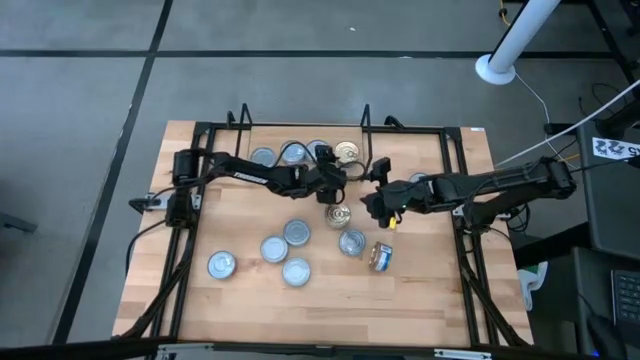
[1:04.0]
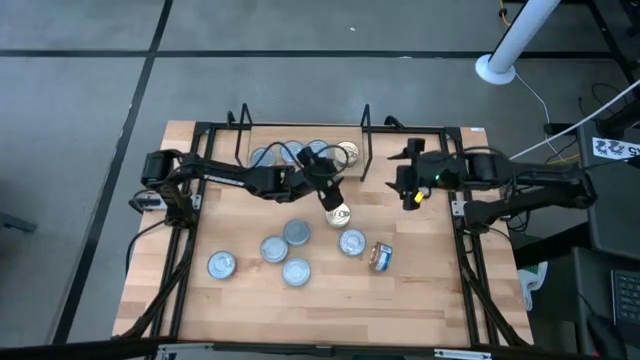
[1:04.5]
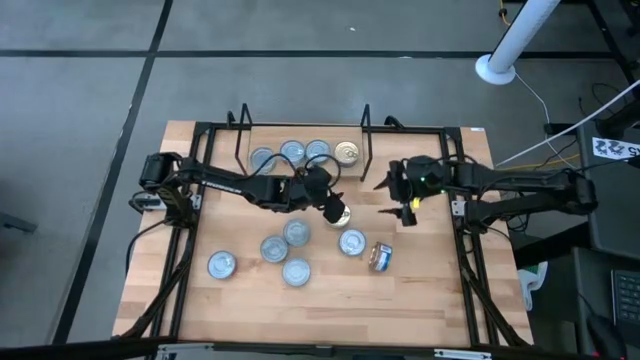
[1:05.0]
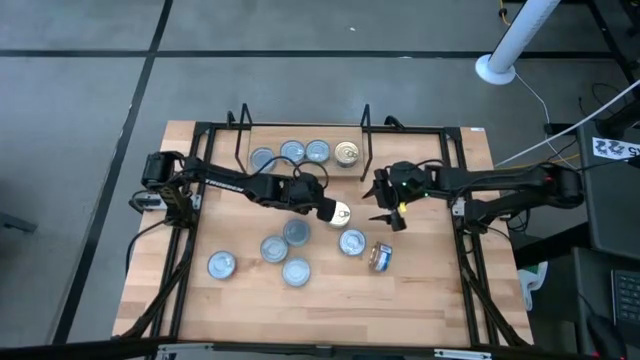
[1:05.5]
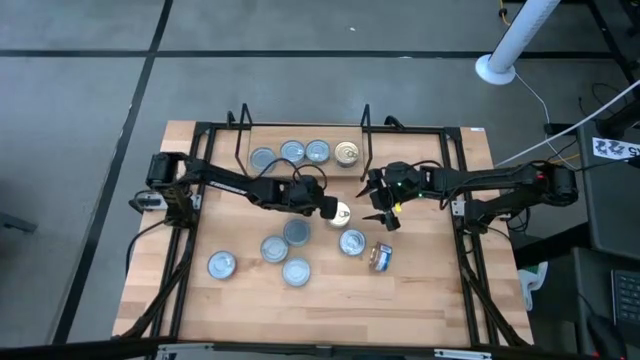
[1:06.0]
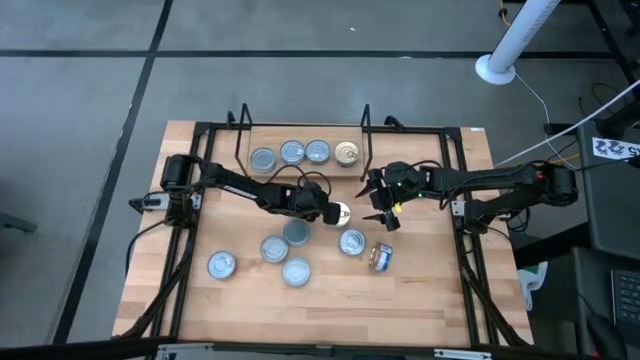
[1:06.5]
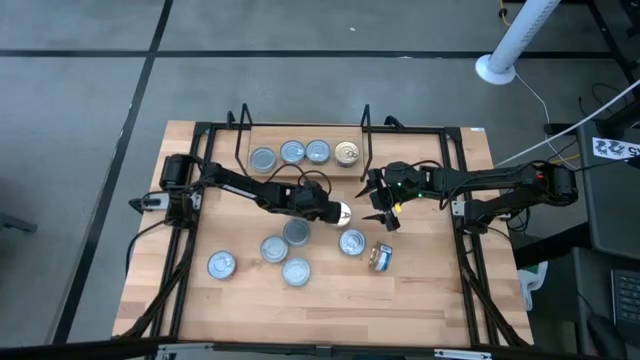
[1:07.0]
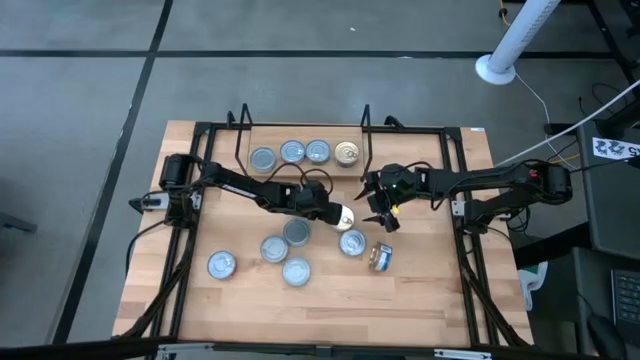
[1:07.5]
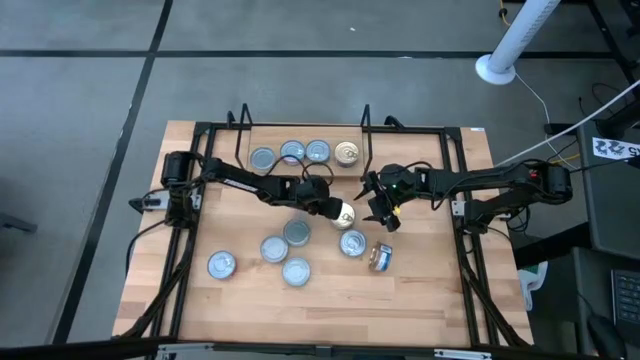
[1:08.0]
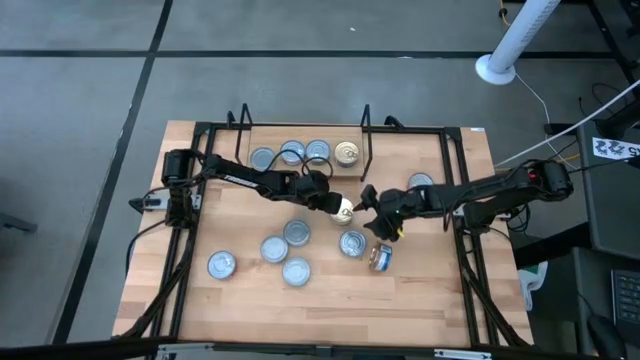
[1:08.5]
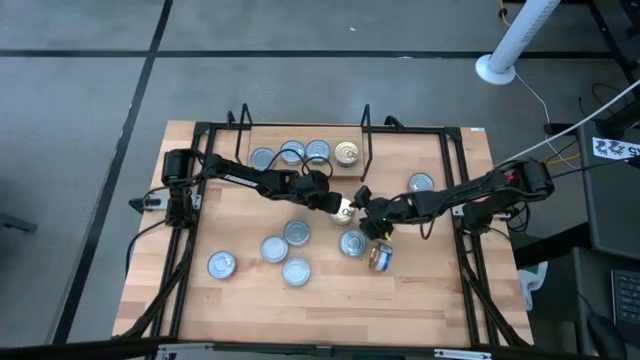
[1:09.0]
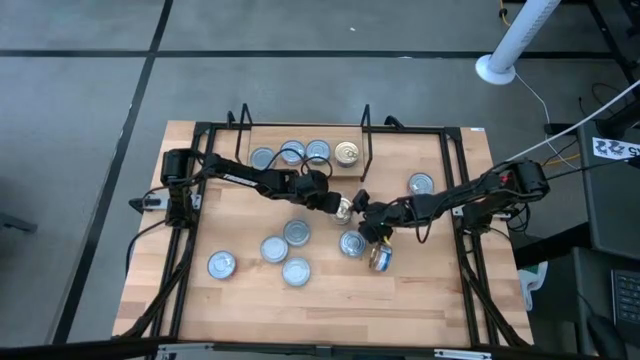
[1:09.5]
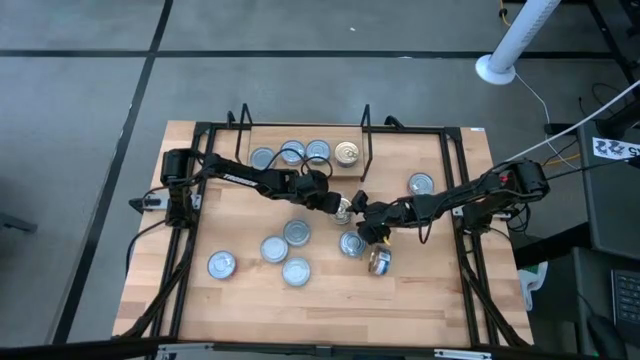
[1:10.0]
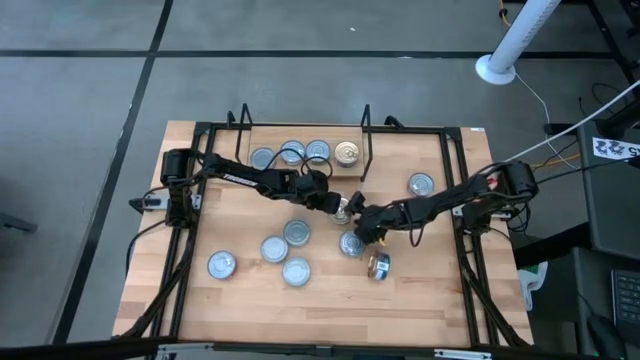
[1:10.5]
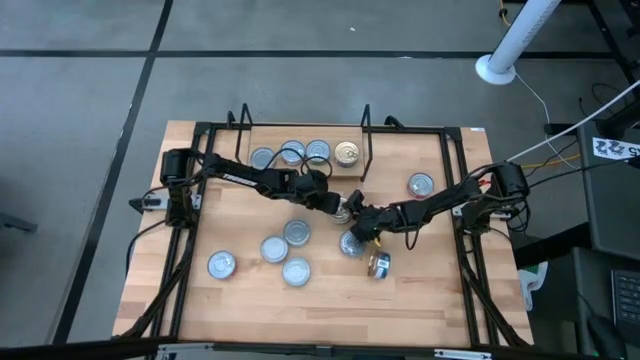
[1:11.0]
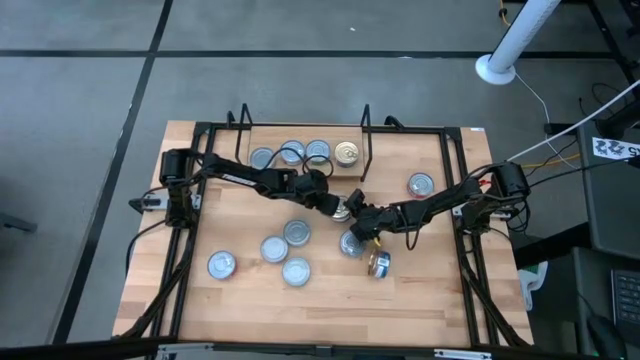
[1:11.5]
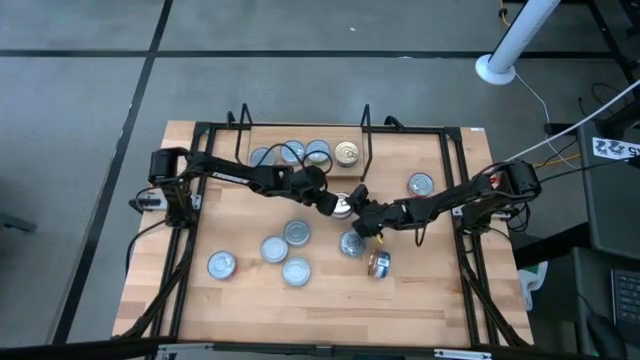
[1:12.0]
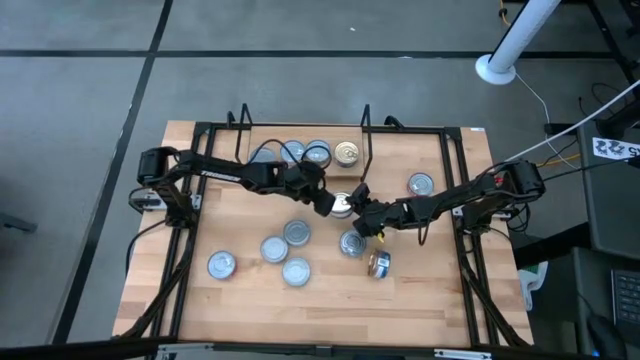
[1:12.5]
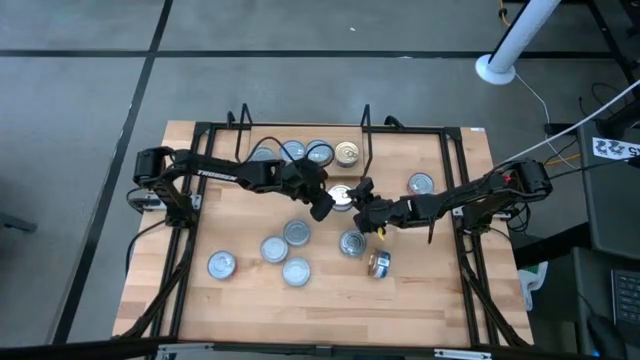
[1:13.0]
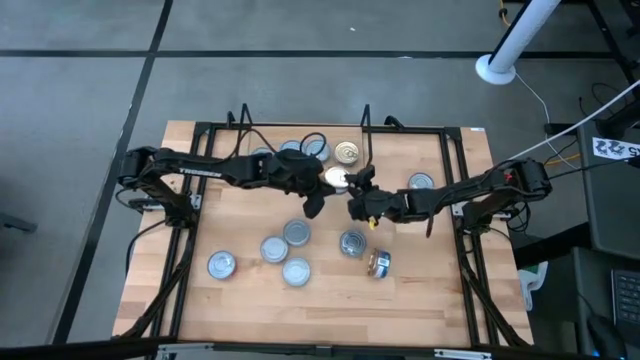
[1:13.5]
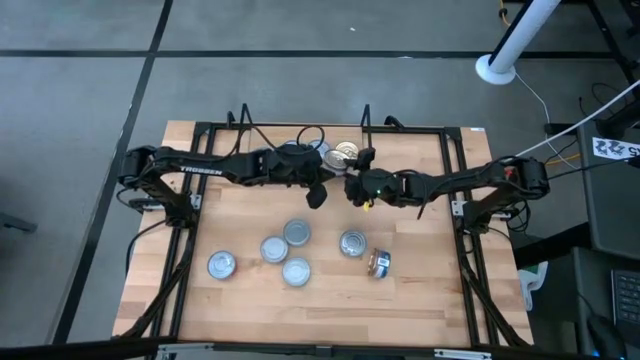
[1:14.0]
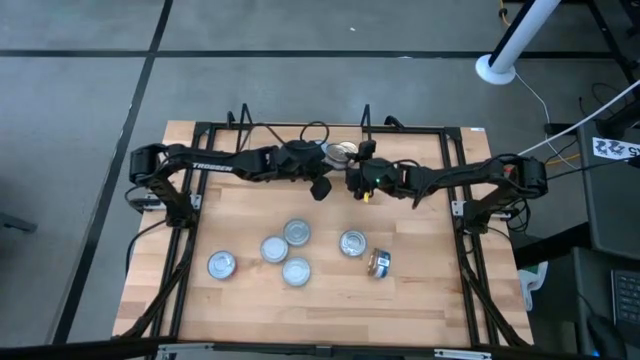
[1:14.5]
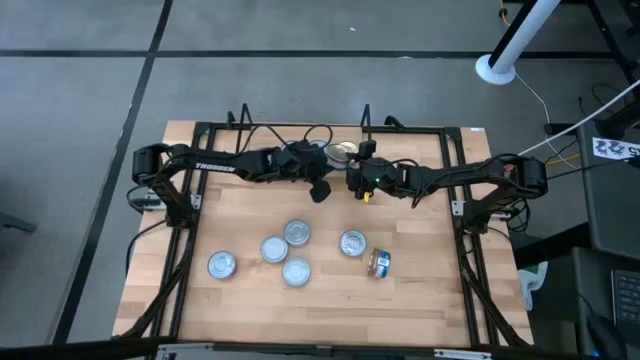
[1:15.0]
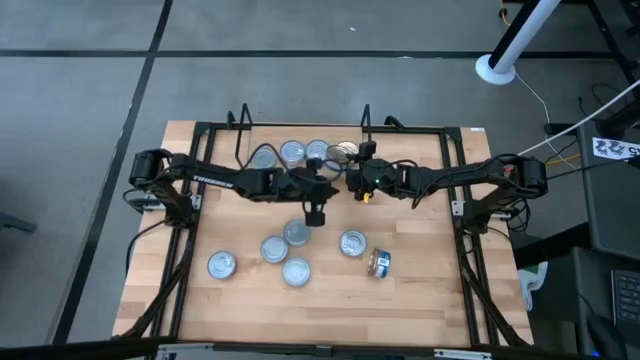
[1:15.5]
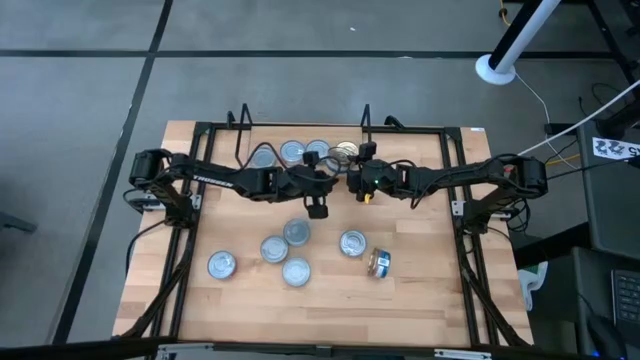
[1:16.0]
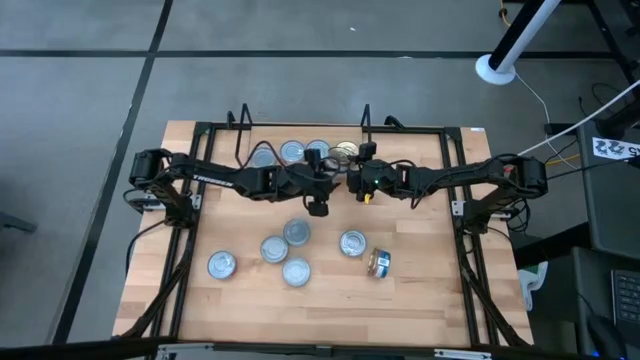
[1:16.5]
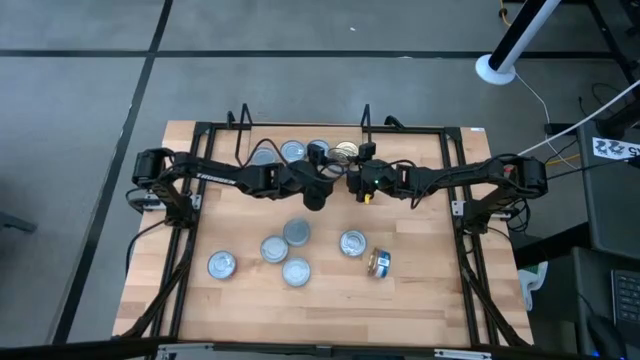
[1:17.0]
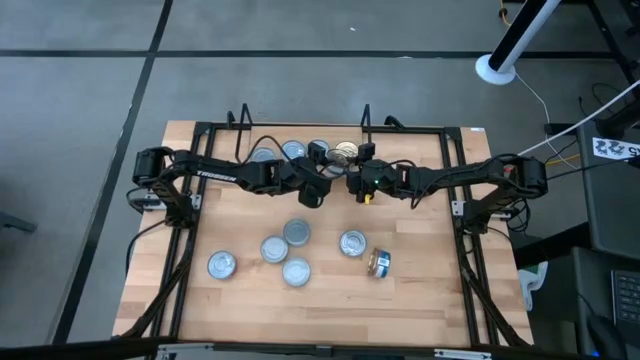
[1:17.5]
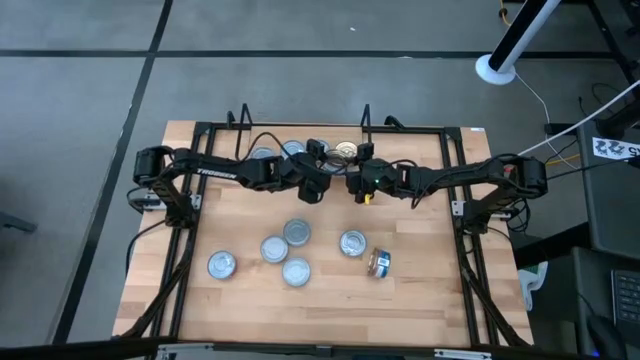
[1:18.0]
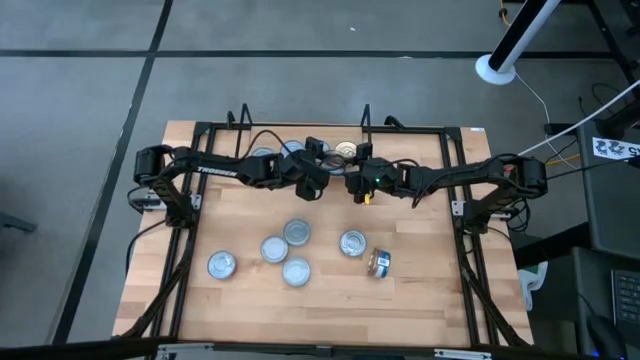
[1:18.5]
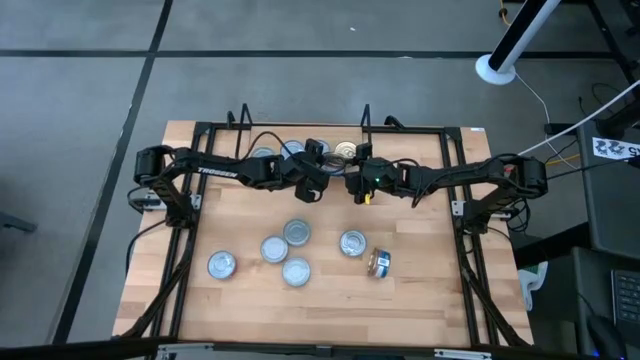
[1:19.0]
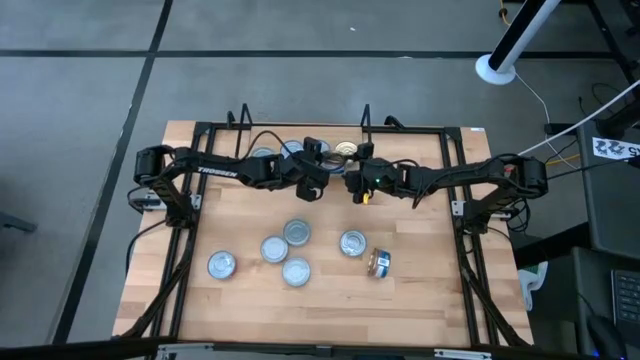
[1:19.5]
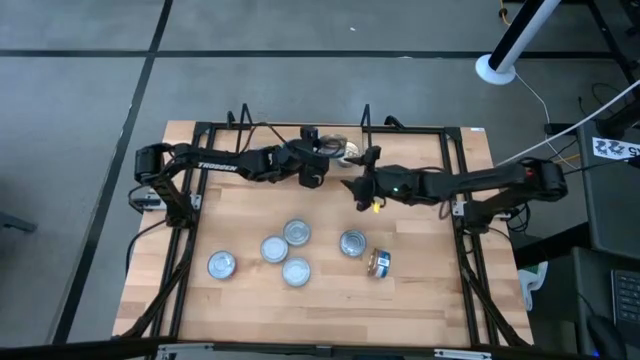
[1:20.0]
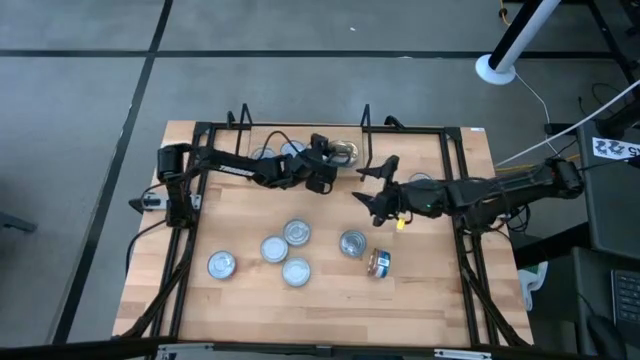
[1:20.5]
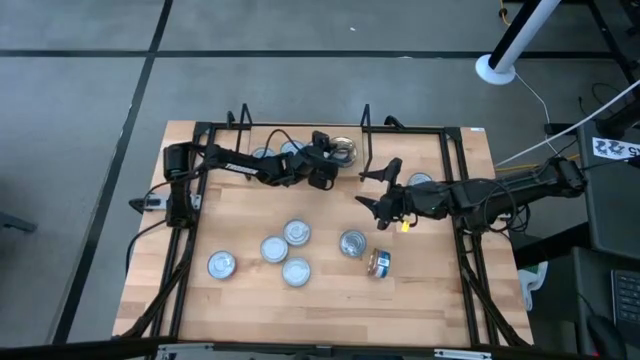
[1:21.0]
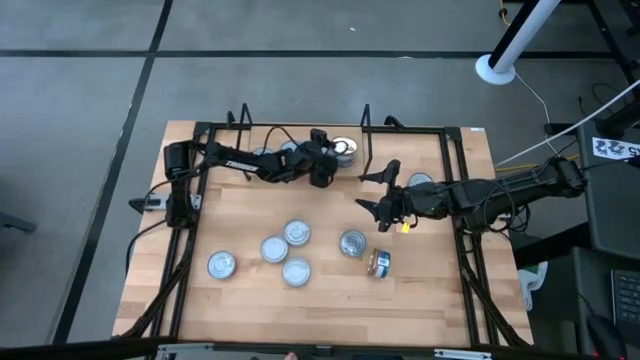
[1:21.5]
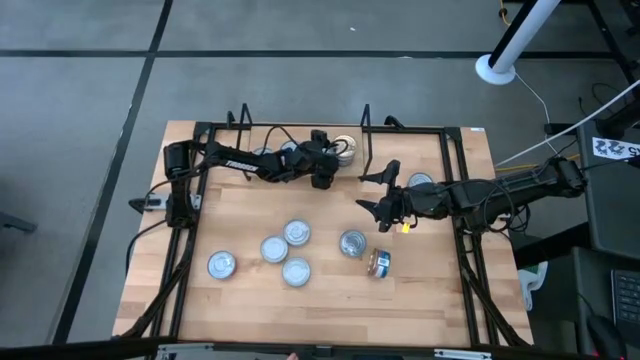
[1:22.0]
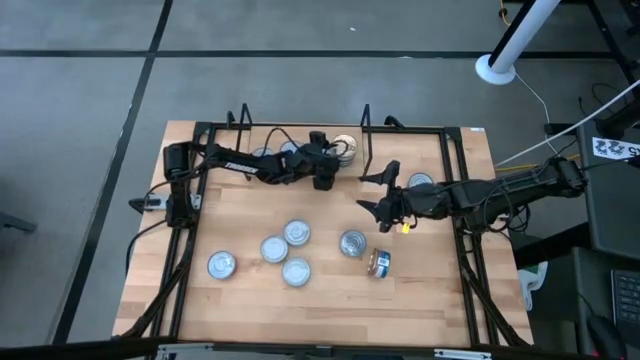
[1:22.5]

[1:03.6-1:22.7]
Task: Stack canned seafood by type on shelf
Stack the blue-pink tuna can on top of the blue-pink tuna can on the shelf

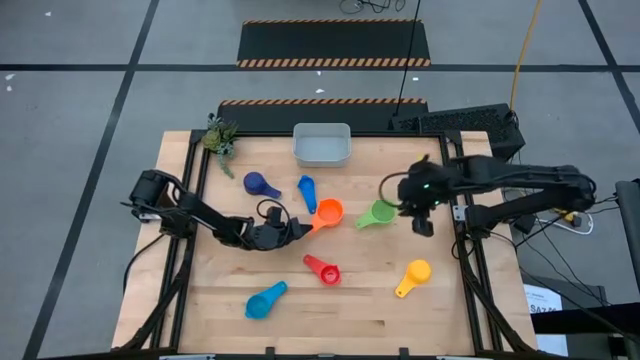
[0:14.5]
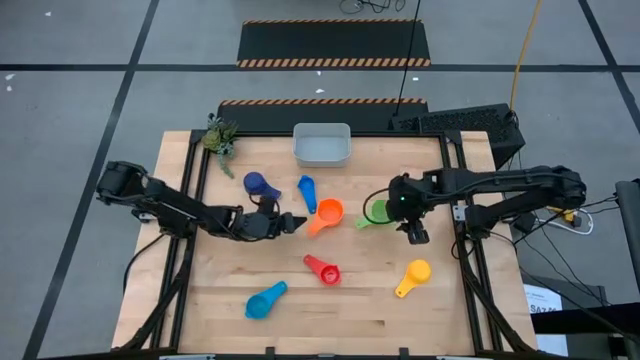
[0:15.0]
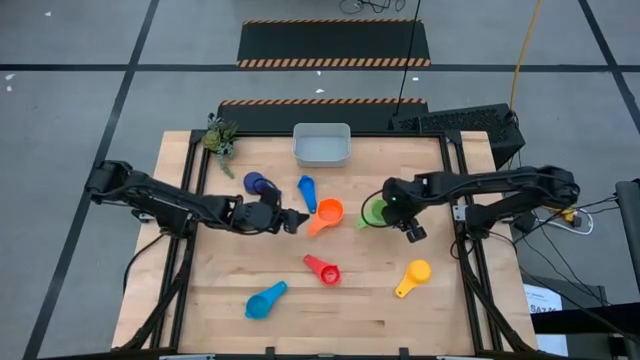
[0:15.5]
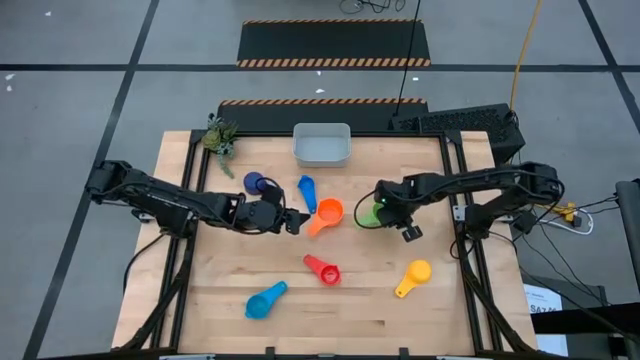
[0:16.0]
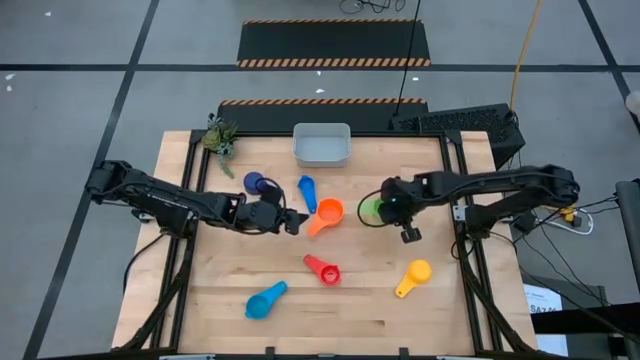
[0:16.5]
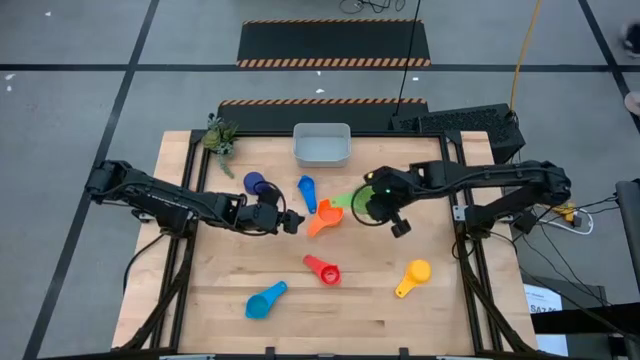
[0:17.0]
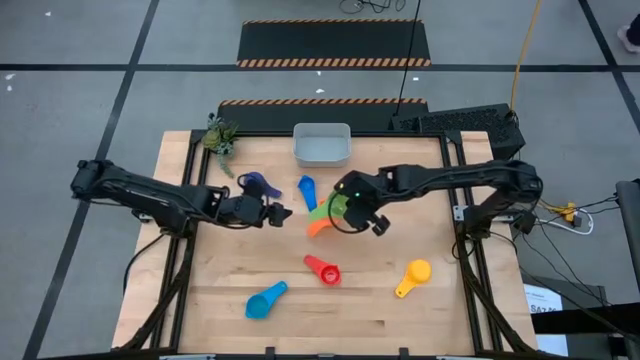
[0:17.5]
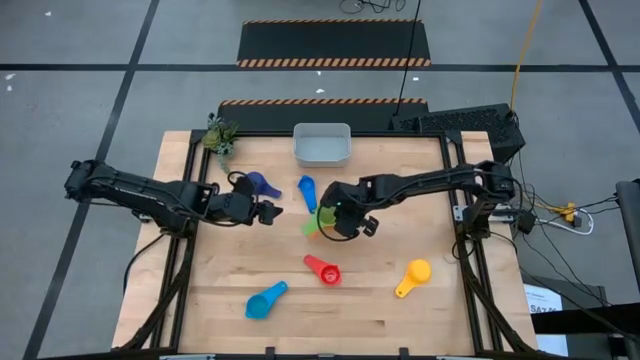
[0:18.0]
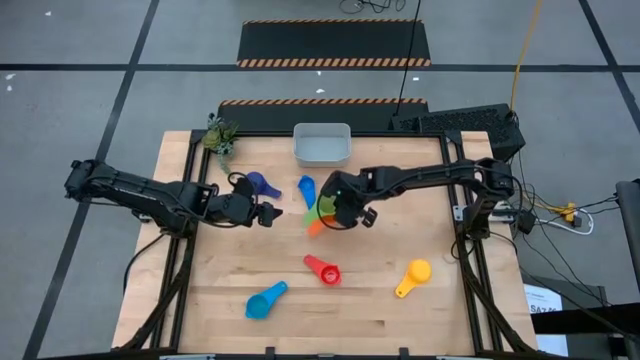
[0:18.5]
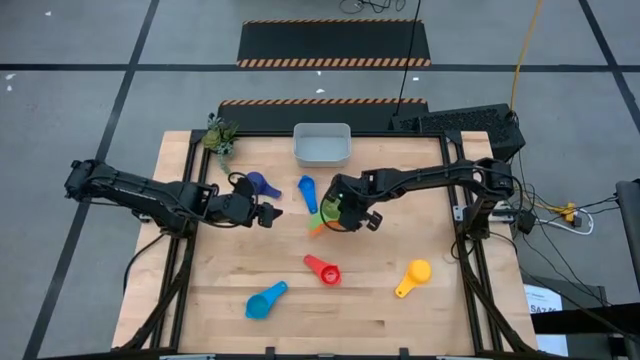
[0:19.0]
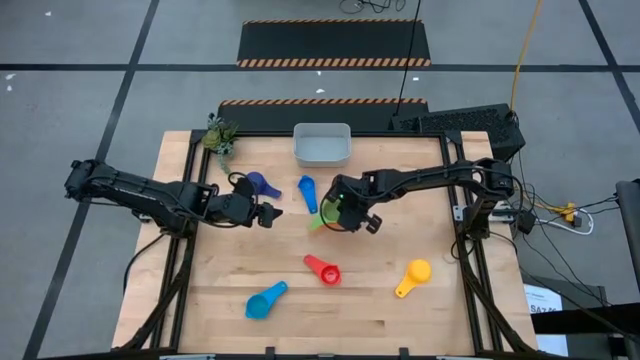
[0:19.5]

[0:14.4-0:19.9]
Task: Nest measuring cups in basket
Stack the green measuring cup into the orange measuring cup
